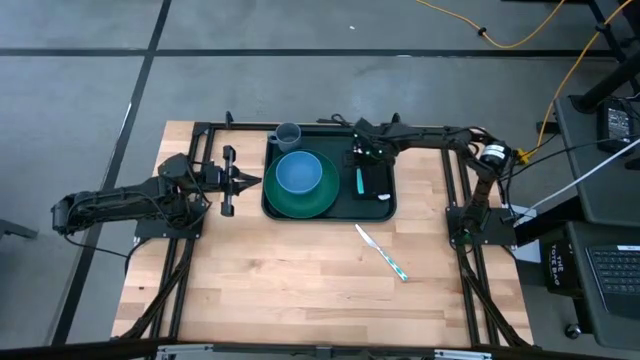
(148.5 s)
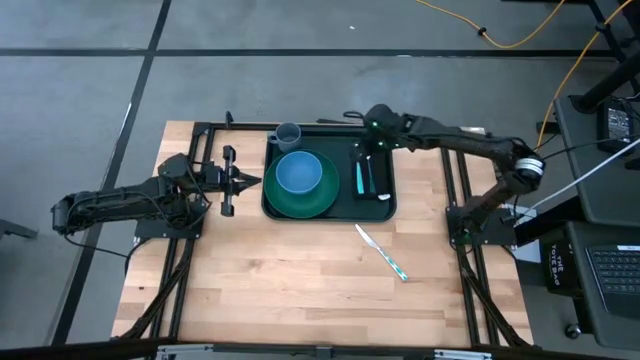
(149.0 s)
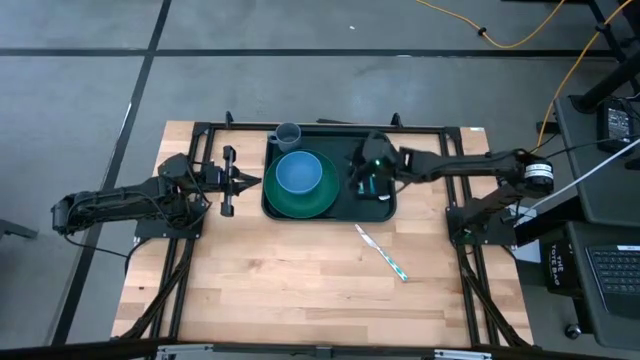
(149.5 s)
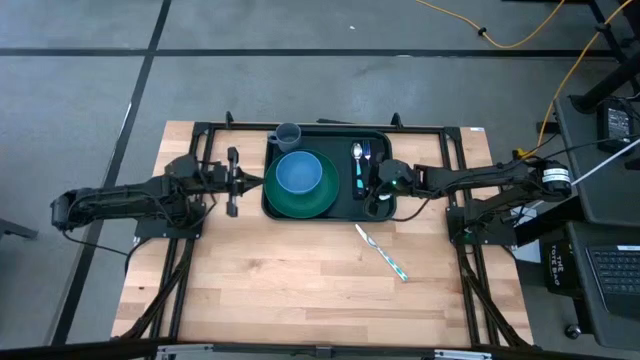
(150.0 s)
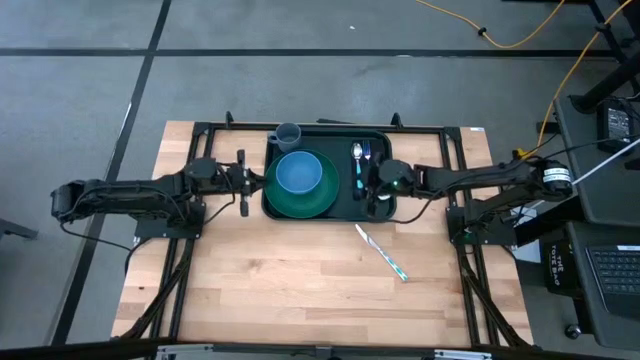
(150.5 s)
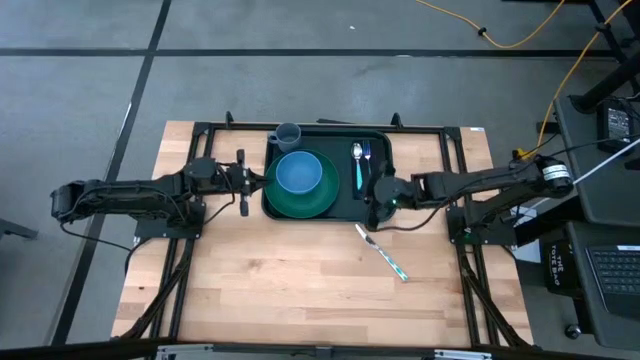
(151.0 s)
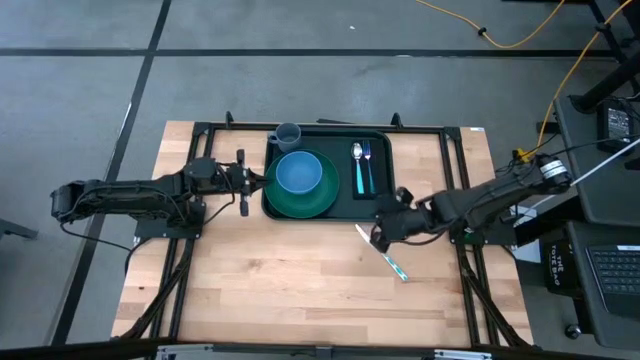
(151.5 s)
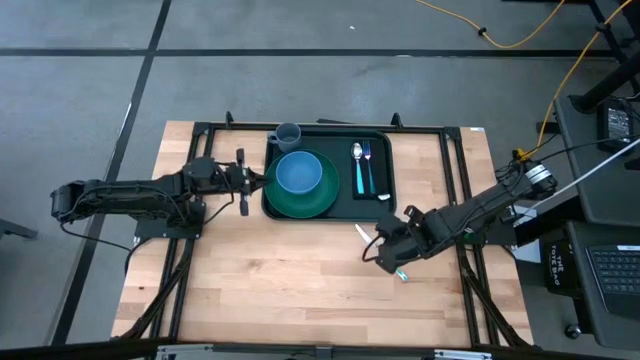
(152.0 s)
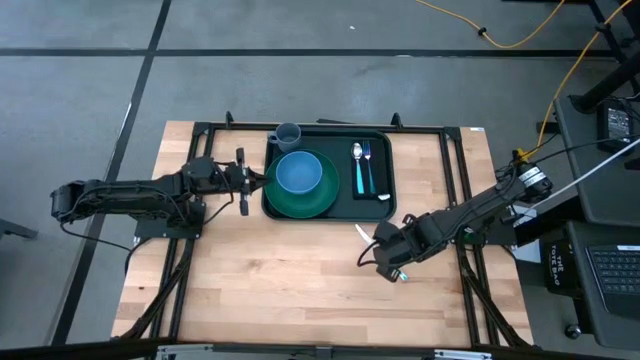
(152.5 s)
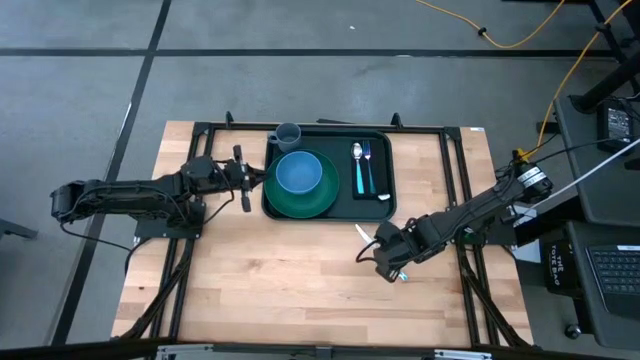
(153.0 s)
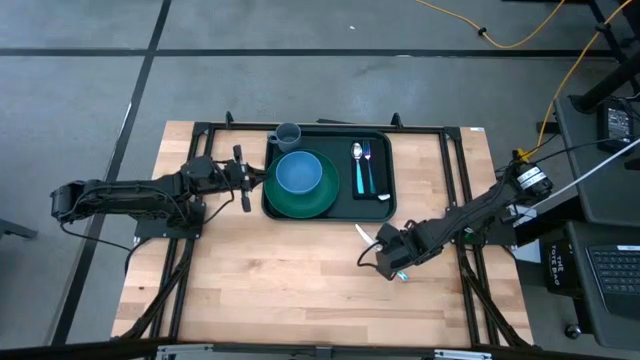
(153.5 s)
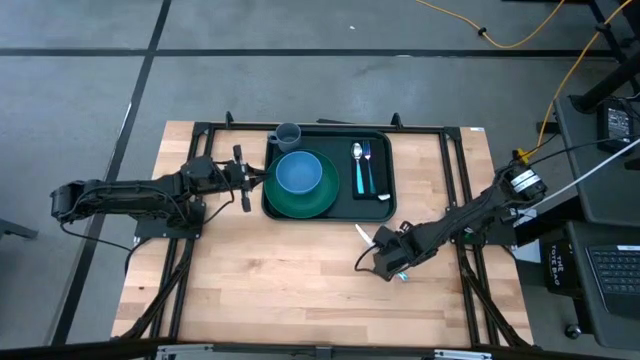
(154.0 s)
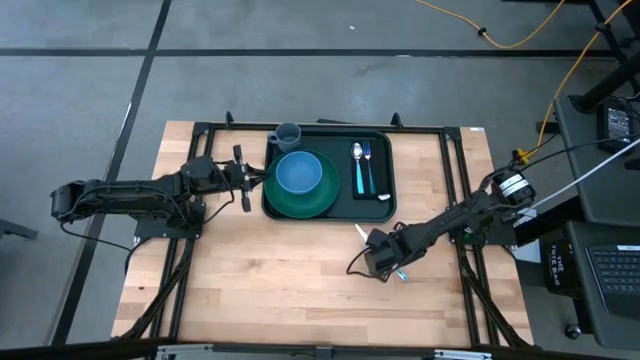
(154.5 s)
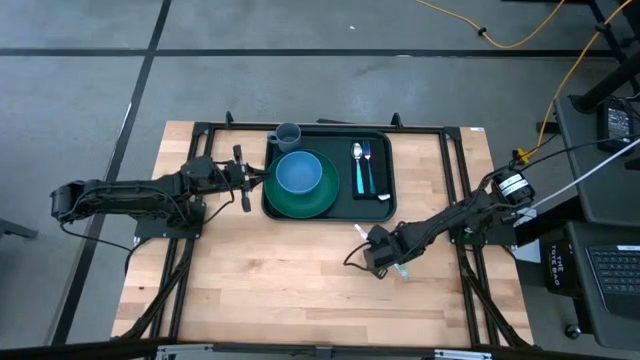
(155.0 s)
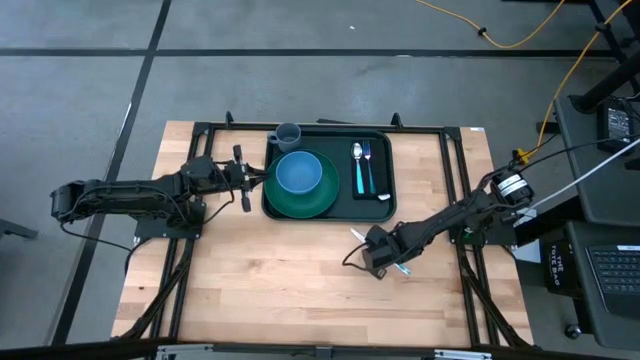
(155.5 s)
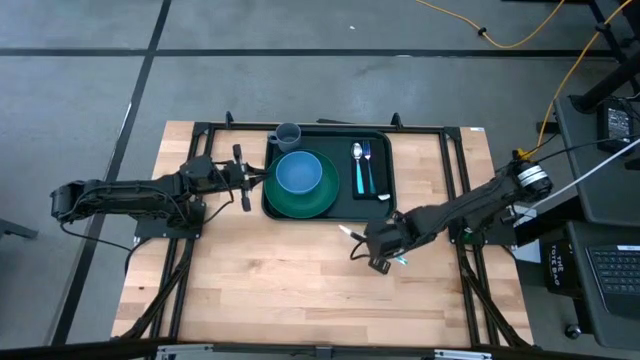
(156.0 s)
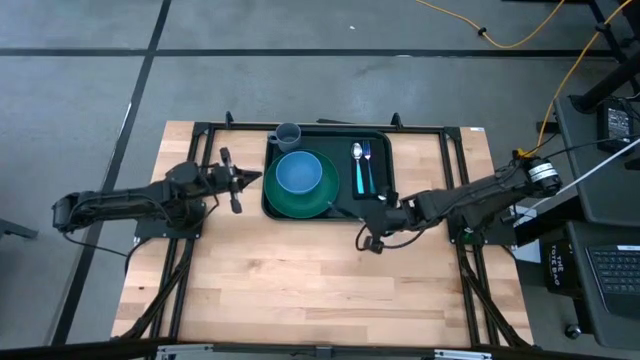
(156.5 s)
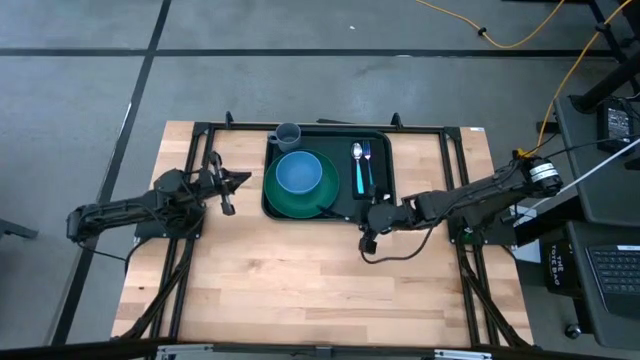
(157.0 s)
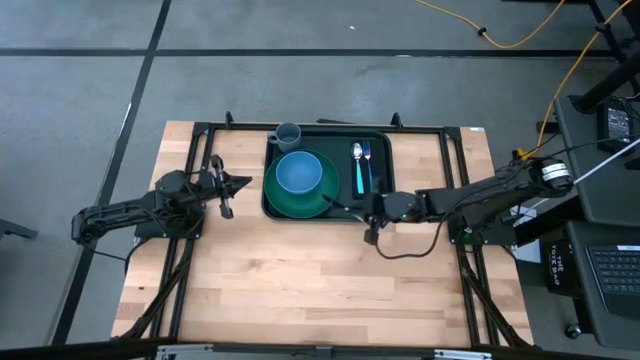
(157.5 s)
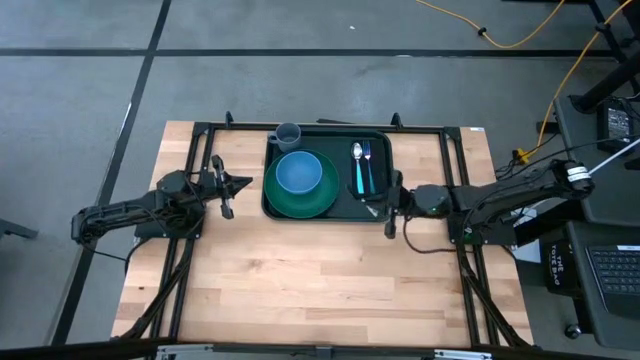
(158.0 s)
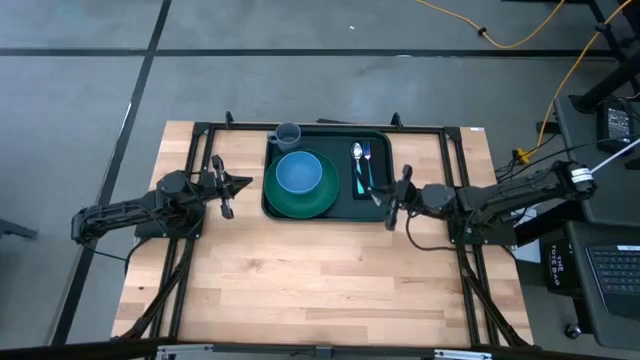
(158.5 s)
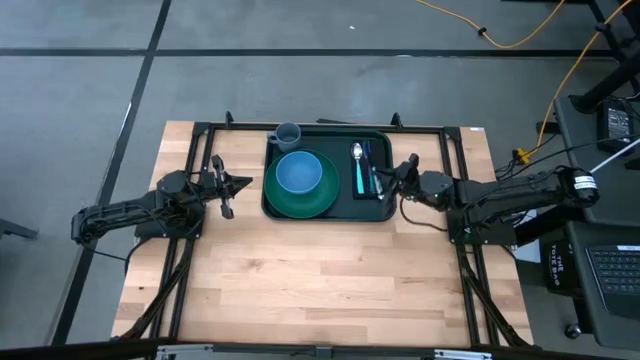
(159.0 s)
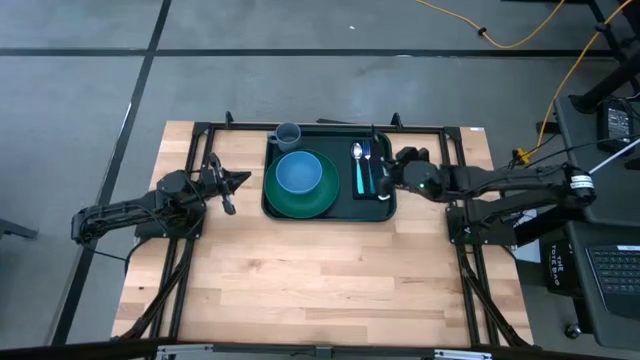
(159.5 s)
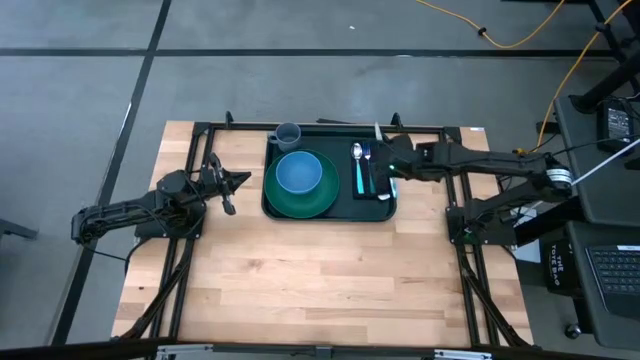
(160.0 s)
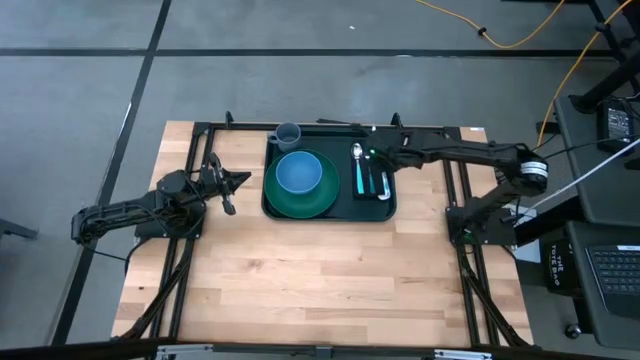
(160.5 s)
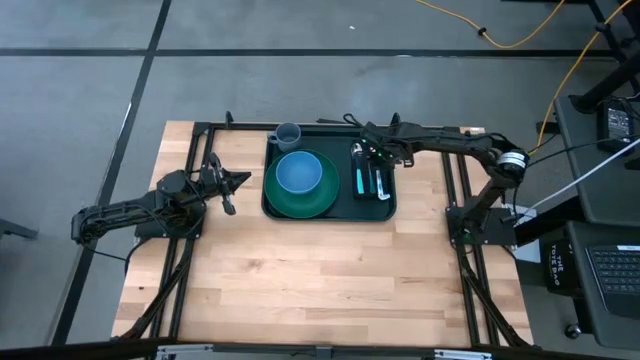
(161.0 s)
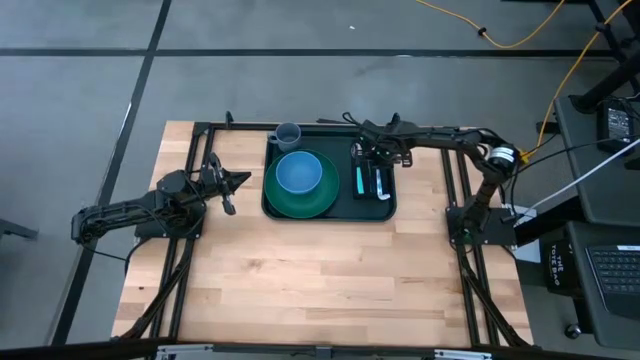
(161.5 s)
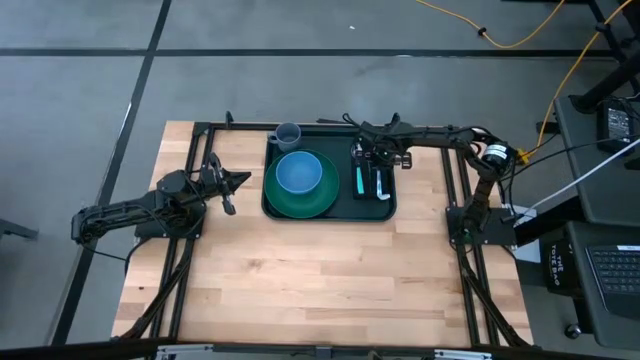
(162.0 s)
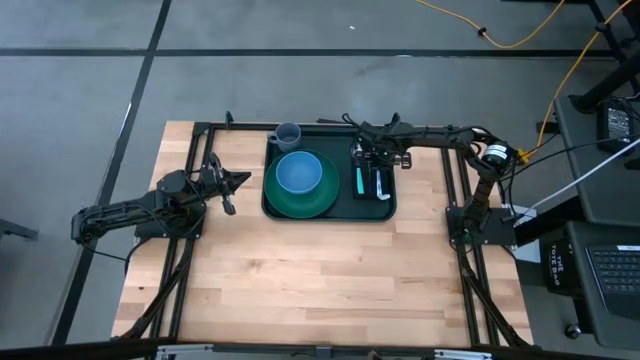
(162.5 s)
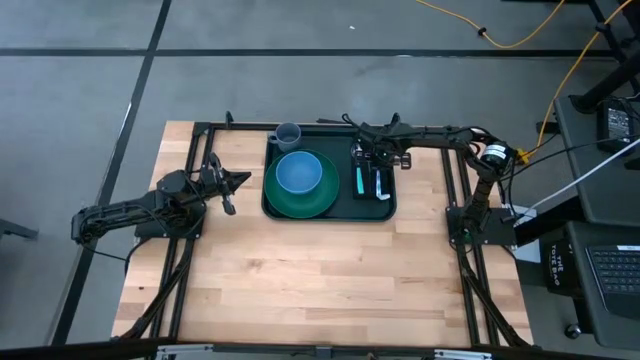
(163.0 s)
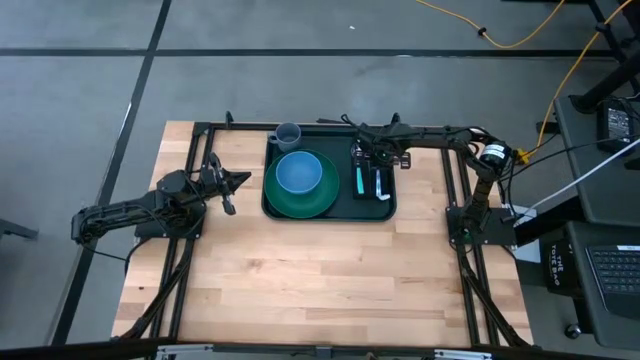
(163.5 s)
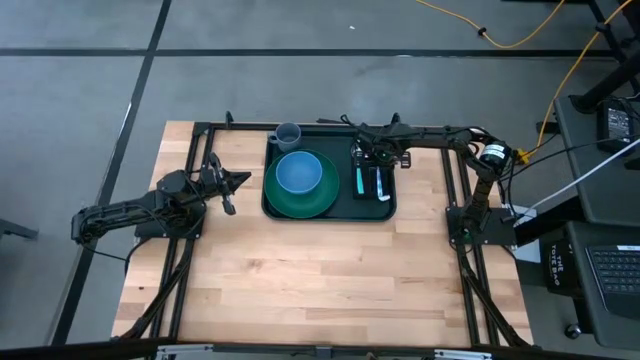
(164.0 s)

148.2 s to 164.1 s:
Task: Set up tray
Put the white patterned table knife on the black table napkin to the right of the blue fork

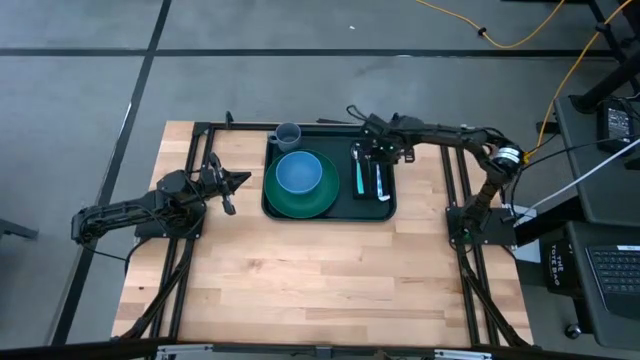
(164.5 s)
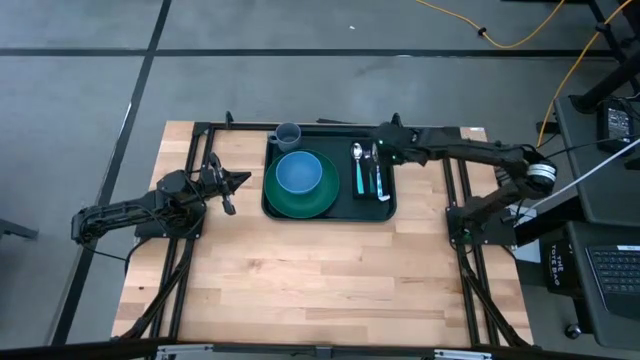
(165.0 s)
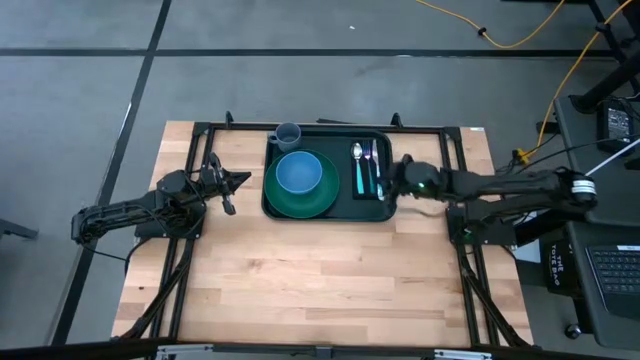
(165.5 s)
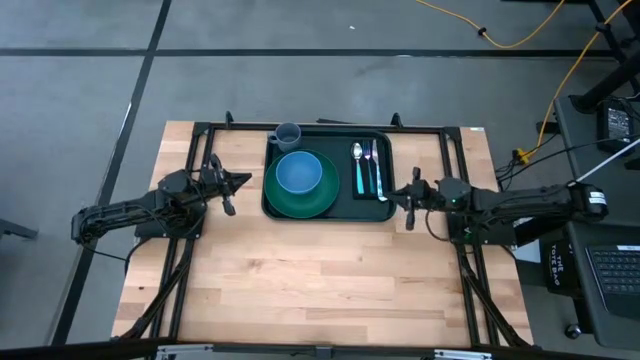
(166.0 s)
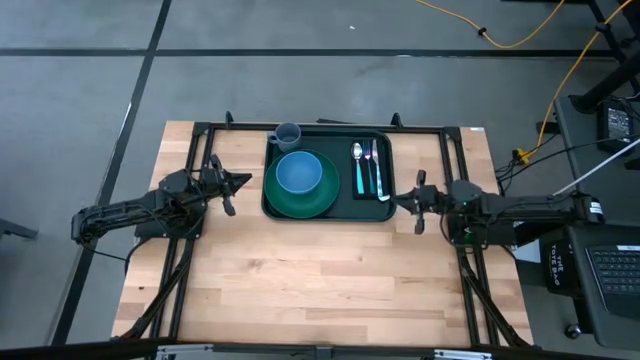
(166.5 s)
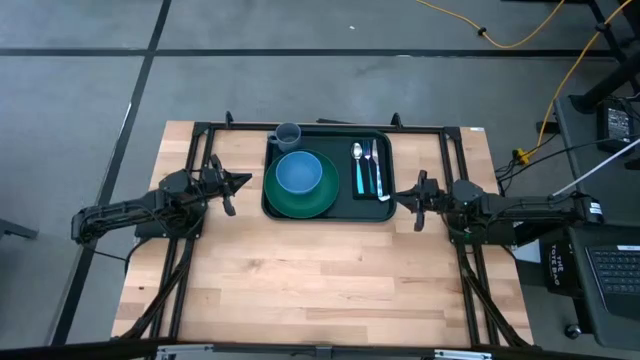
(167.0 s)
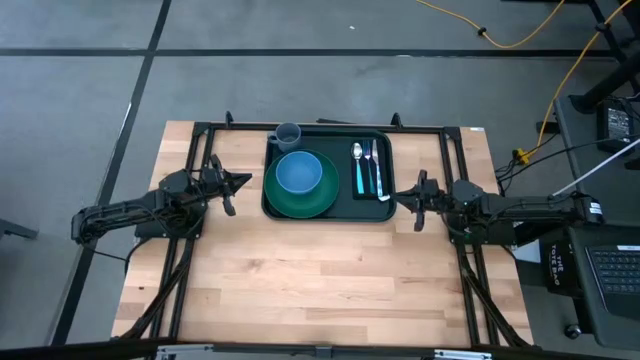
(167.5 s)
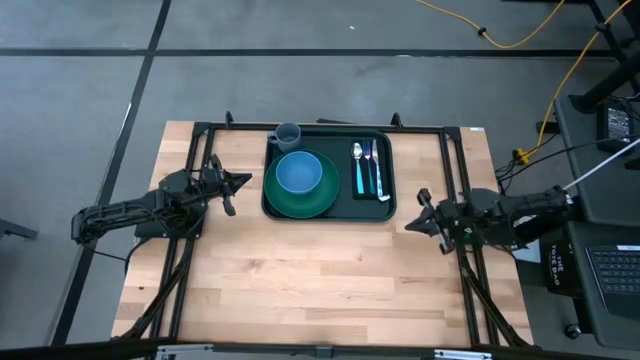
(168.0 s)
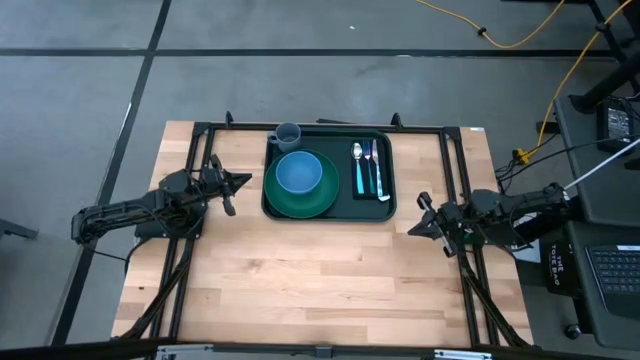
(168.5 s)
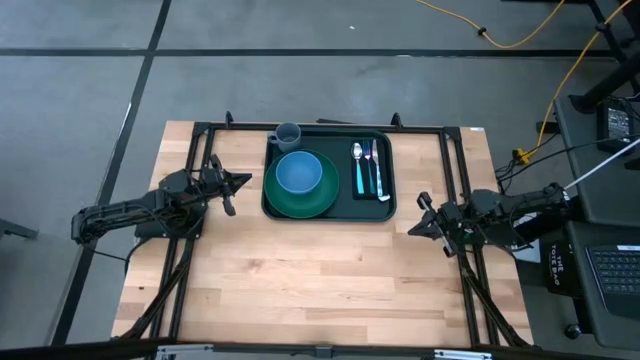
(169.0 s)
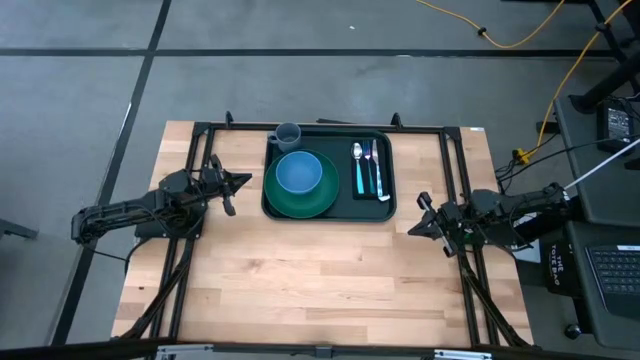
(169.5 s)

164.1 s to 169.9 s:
Return to Home Position
